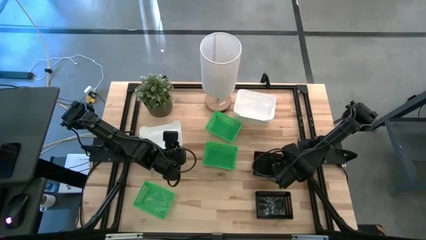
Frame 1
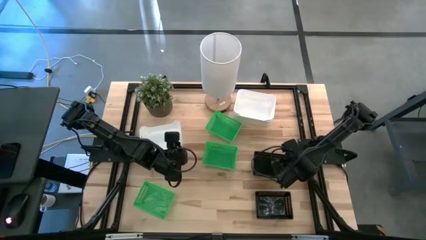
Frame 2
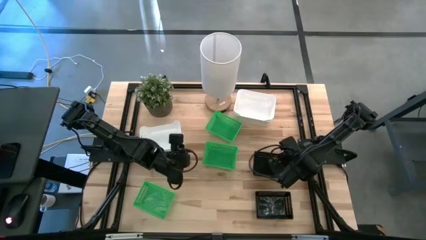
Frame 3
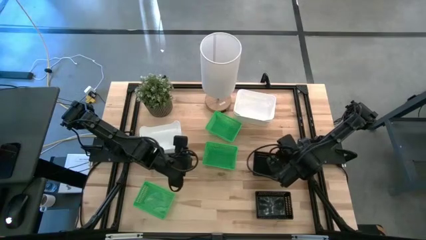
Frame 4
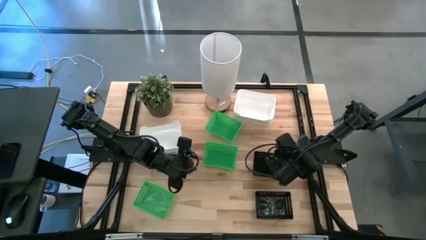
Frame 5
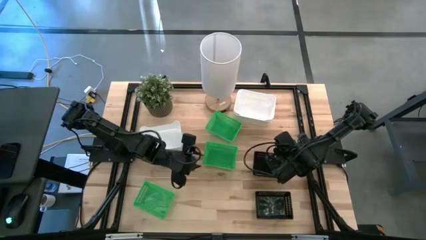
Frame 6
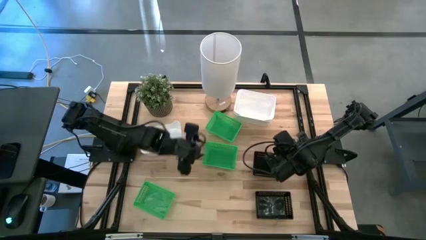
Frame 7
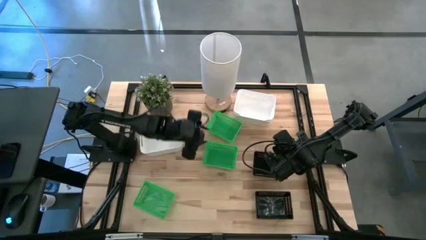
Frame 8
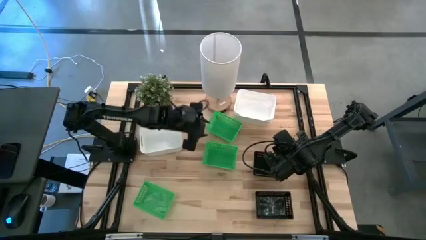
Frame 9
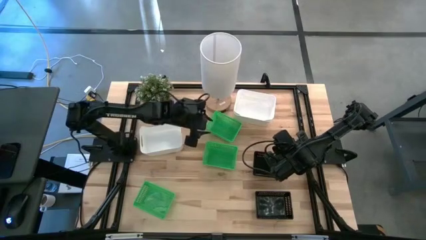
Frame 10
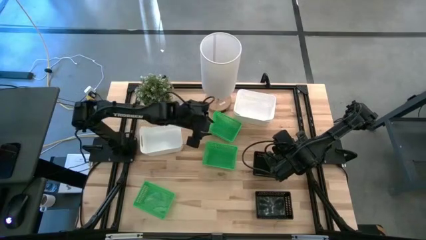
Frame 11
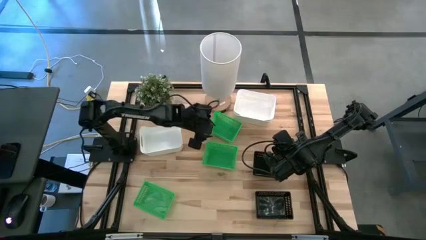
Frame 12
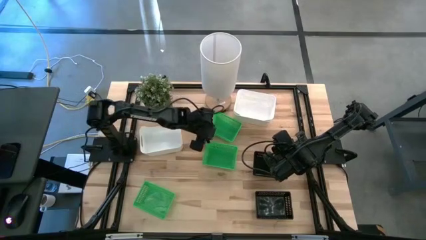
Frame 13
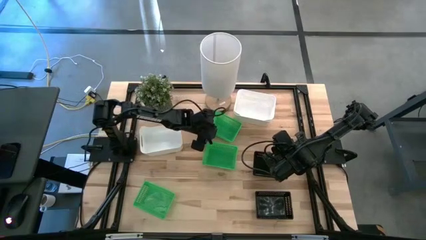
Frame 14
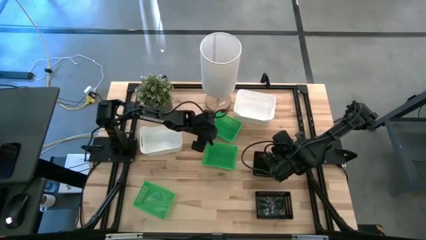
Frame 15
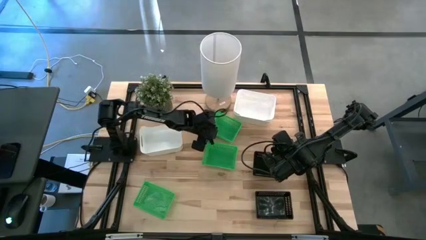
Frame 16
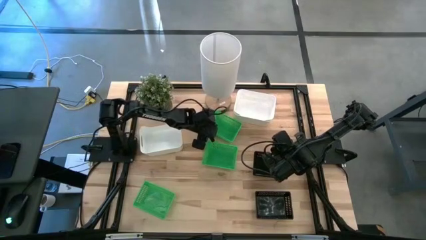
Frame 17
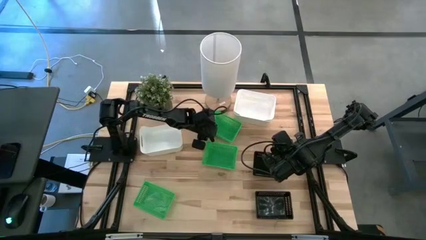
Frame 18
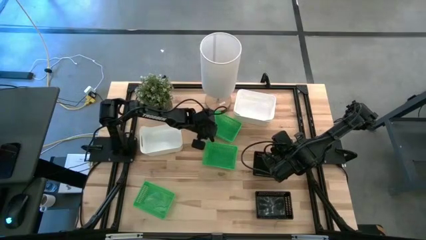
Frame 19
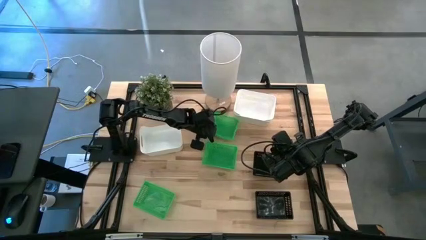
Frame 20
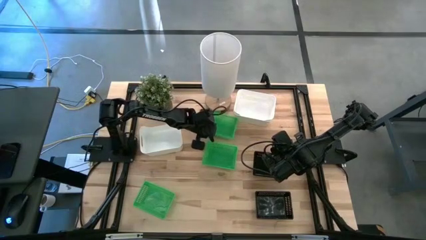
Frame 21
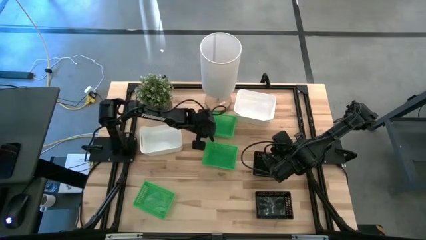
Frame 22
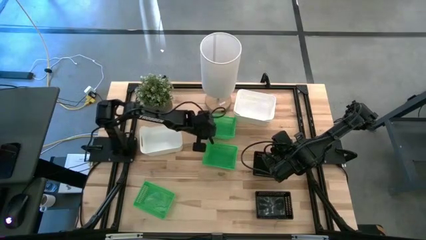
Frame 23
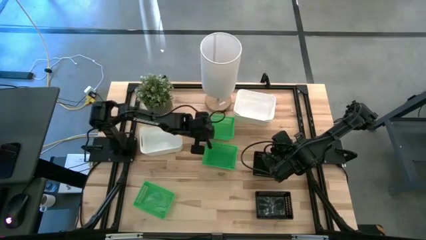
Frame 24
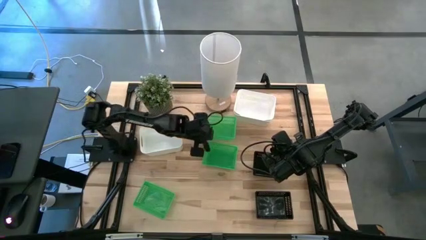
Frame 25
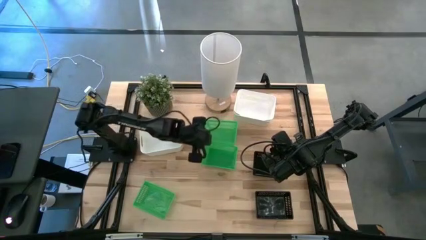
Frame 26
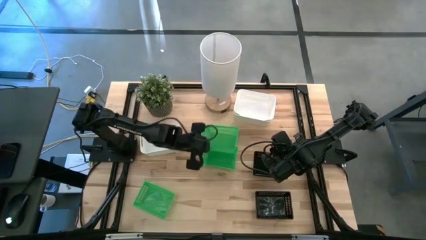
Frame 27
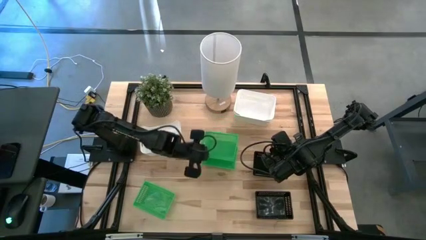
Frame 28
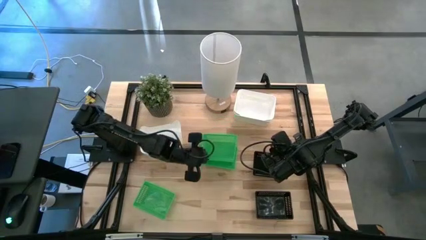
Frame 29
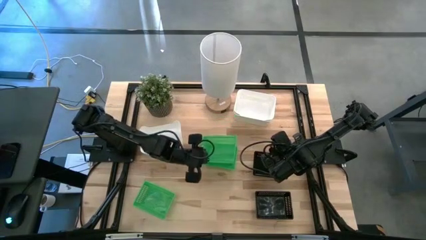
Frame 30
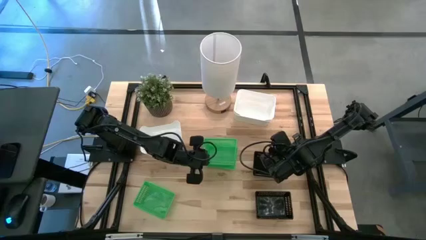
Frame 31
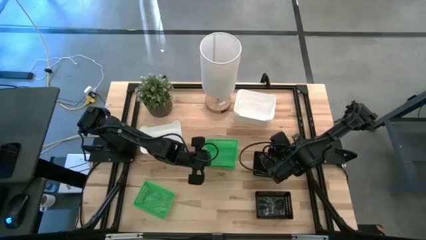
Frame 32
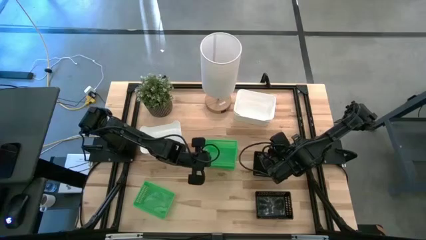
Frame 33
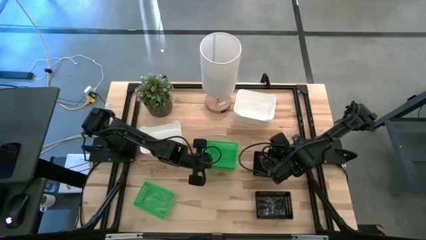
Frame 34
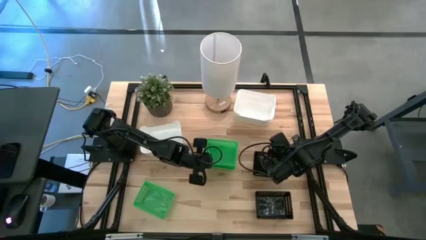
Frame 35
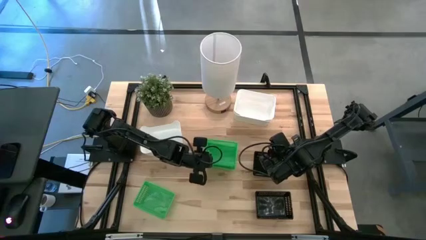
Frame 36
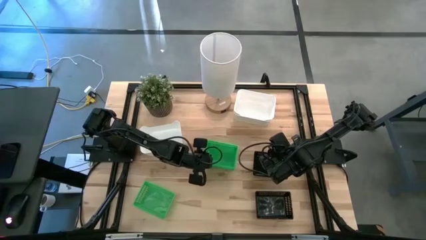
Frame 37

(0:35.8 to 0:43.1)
Stack the top green bin on top of the middle green bin
